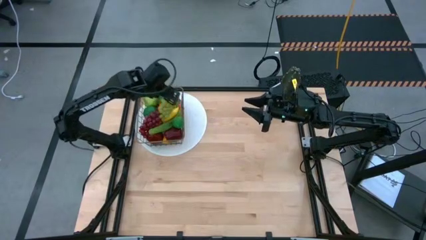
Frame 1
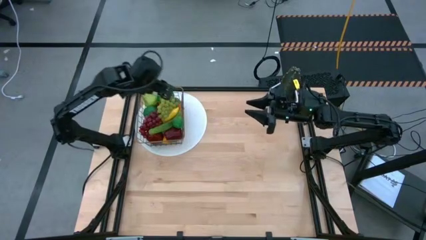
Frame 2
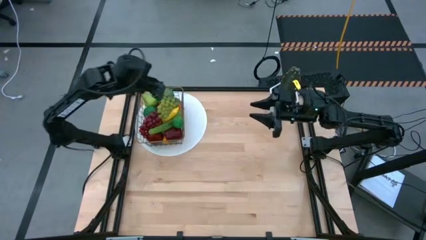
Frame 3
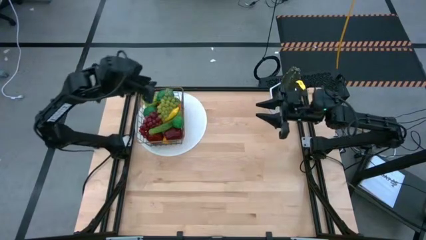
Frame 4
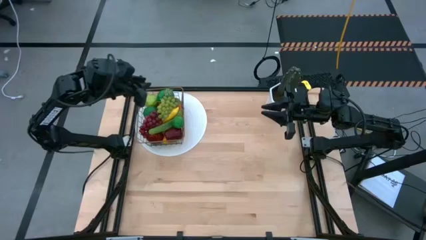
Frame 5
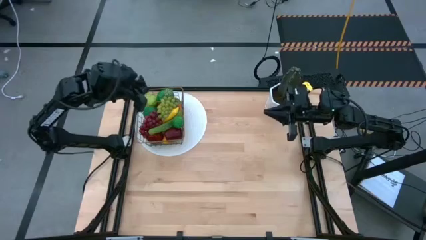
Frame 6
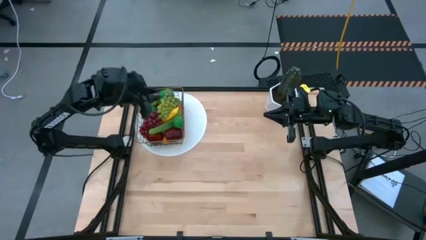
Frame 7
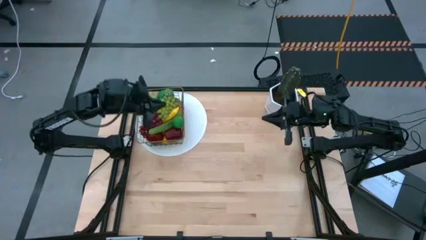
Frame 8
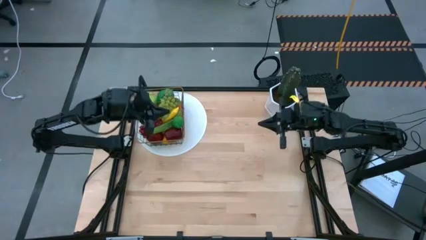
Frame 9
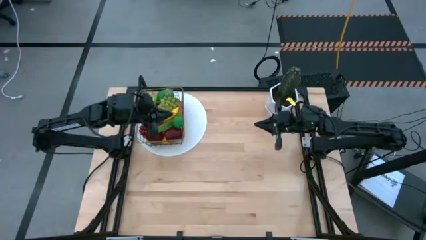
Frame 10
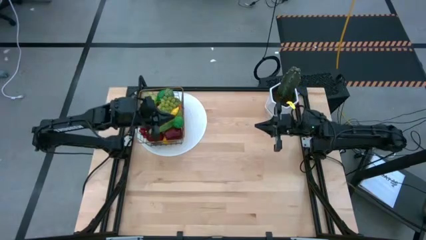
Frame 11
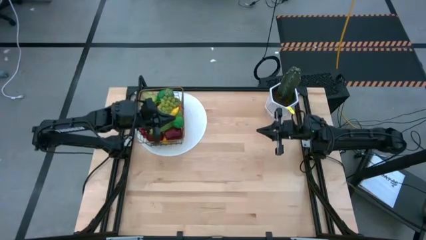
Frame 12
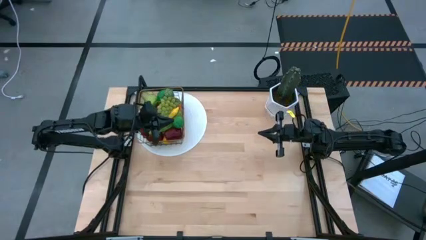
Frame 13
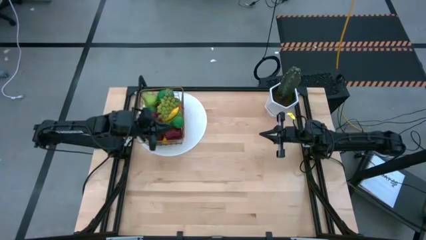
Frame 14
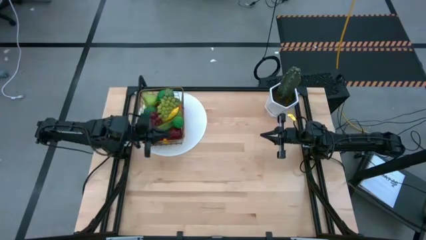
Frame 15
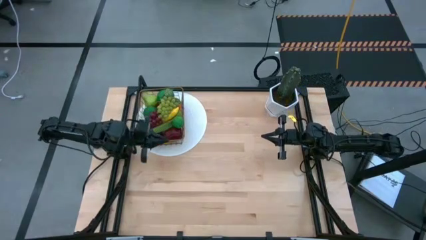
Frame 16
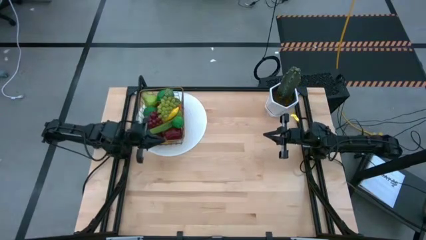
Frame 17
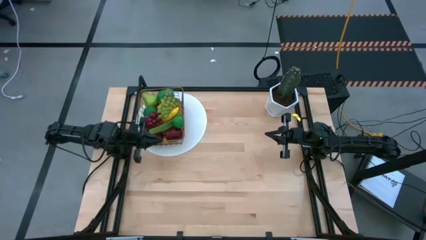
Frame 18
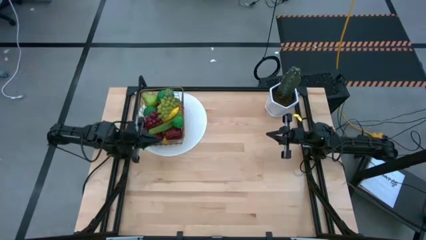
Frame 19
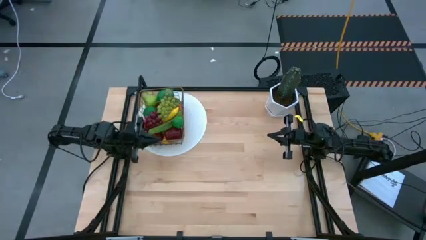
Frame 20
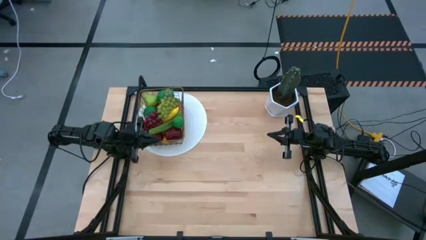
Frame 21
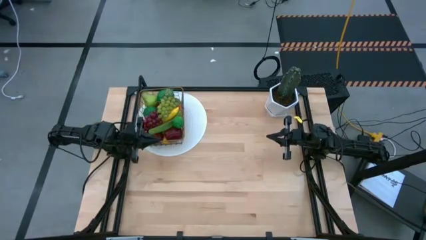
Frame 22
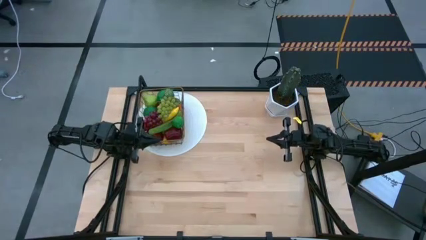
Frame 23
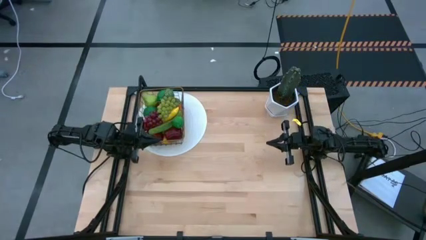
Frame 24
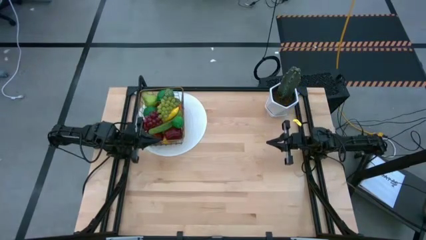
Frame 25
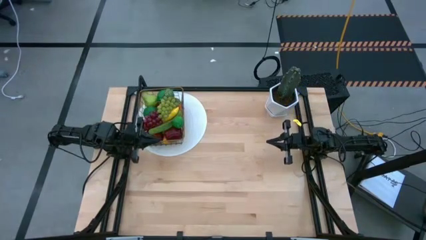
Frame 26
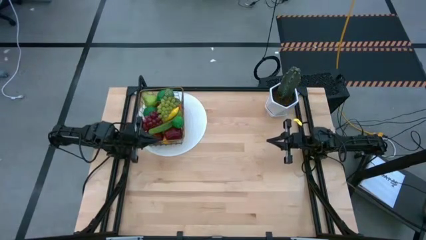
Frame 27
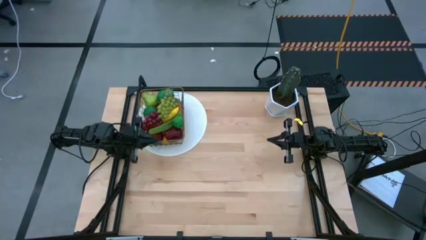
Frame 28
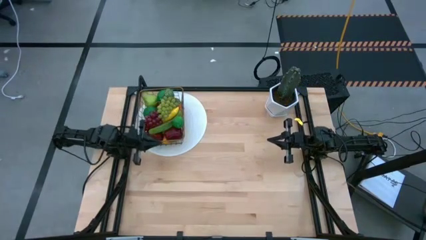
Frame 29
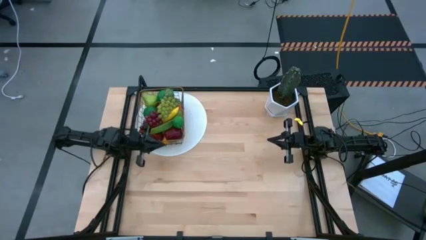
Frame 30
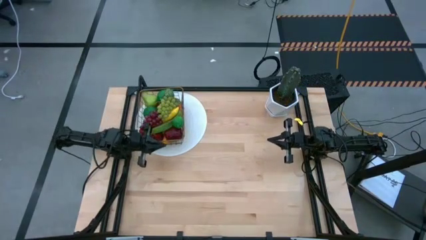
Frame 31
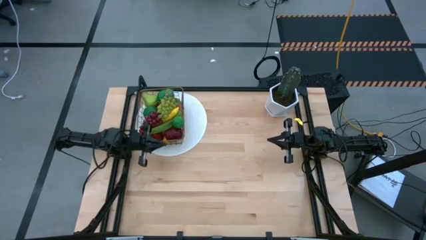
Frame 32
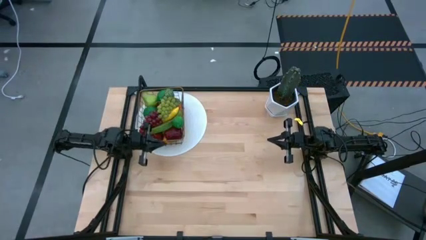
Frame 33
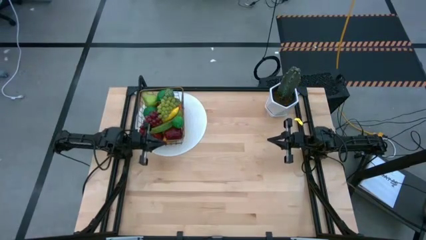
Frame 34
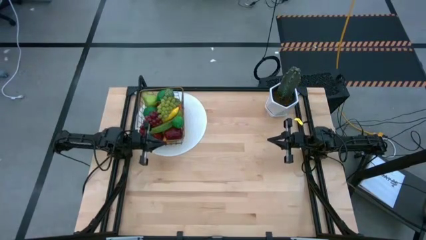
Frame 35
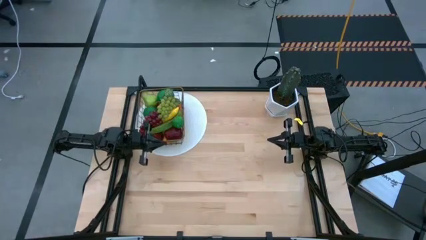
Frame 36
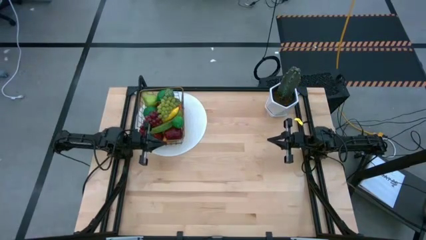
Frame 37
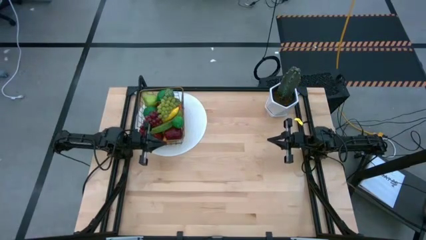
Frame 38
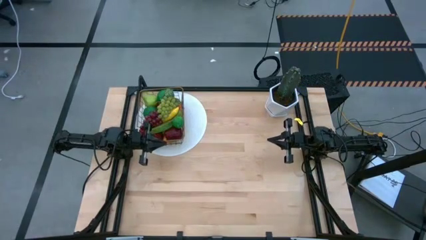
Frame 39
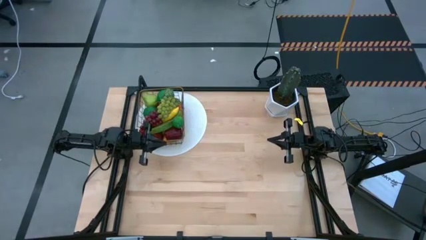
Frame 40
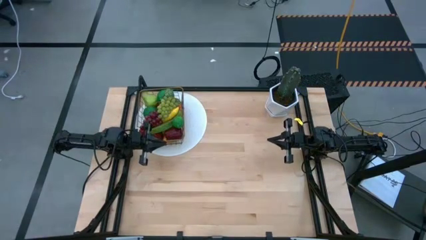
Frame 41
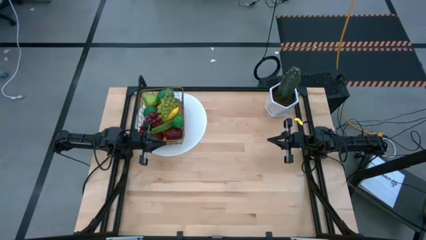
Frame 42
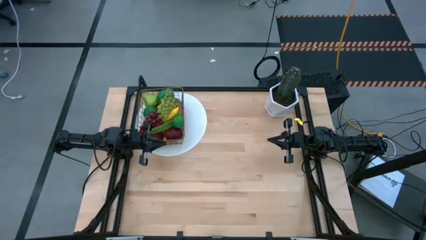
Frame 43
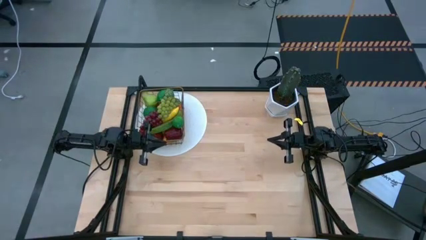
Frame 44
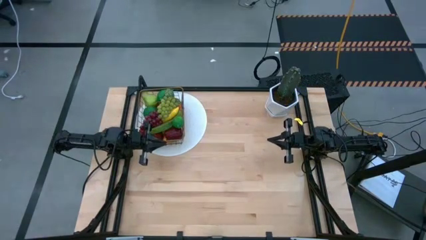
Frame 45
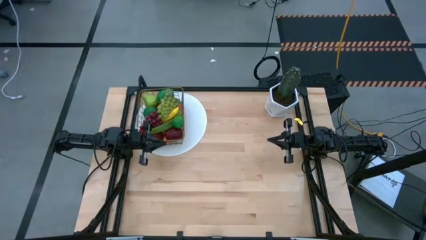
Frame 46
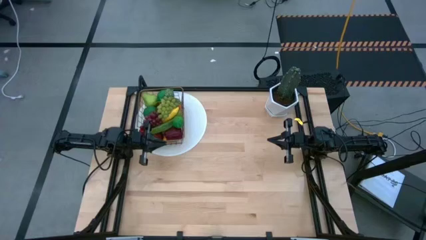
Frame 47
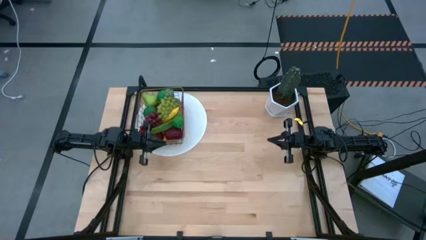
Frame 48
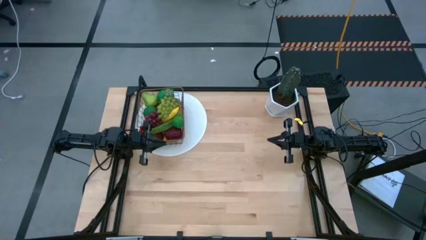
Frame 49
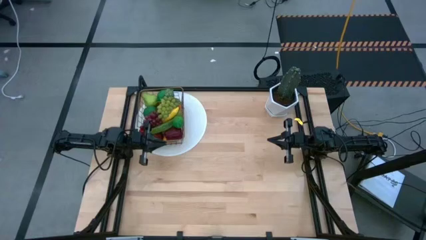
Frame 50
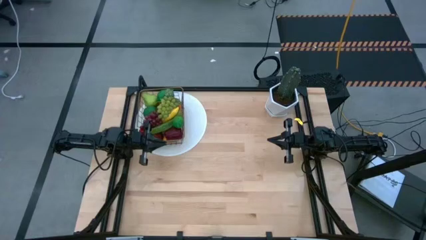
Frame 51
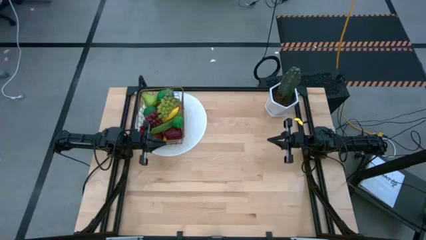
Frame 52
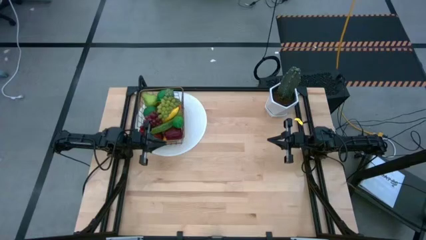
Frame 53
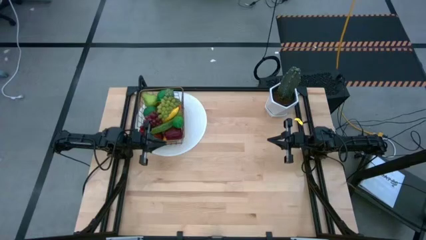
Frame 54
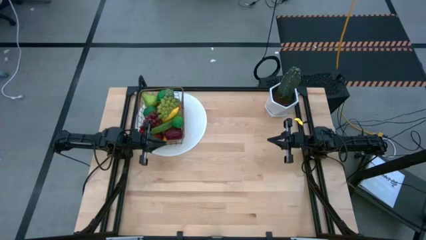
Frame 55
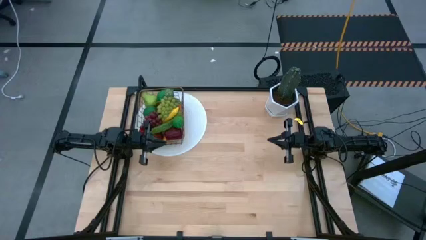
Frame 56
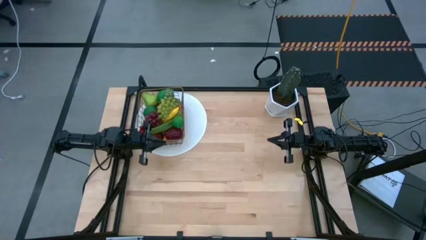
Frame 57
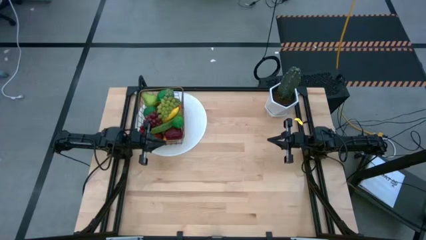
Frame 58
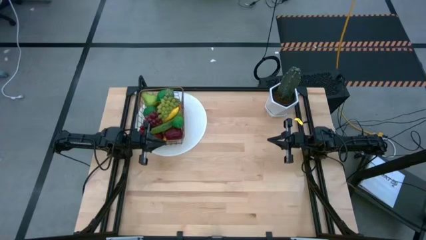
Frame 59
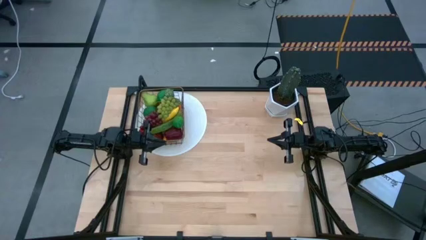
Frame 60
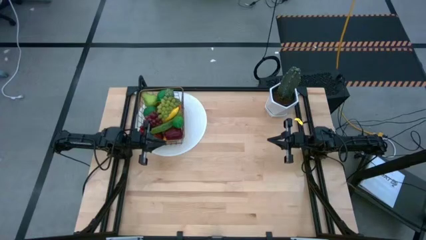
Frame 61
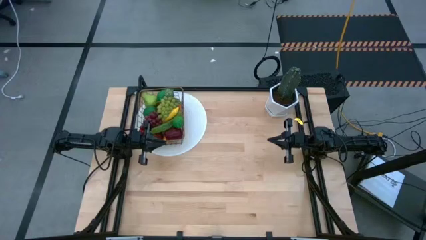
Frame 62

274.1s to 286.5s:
Task: Build produce basket
Return to Home Position

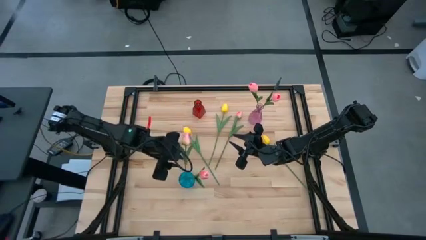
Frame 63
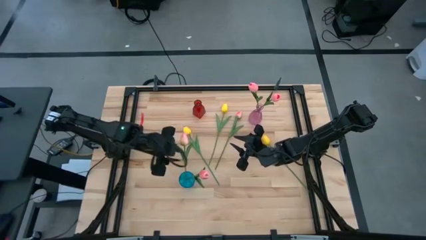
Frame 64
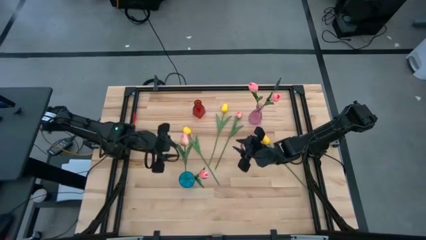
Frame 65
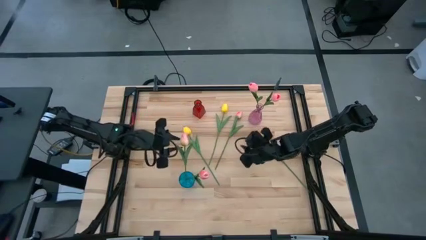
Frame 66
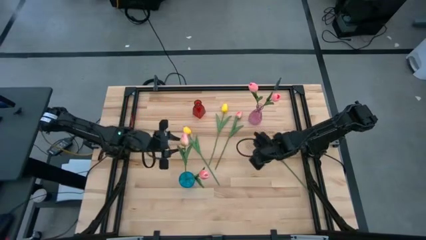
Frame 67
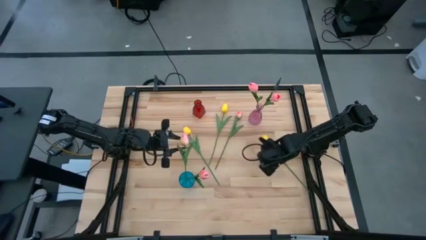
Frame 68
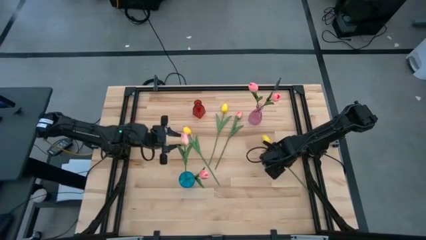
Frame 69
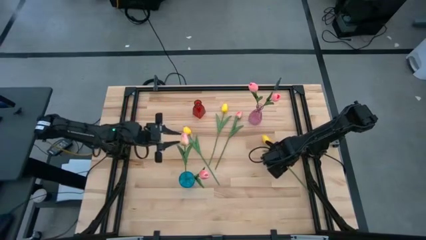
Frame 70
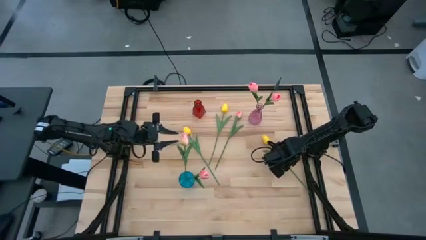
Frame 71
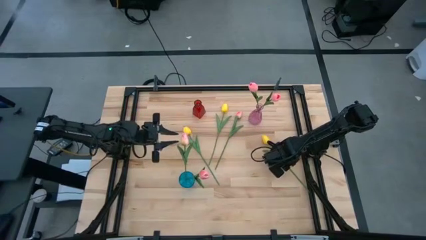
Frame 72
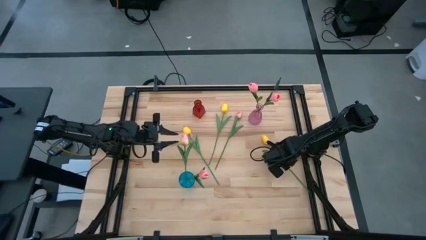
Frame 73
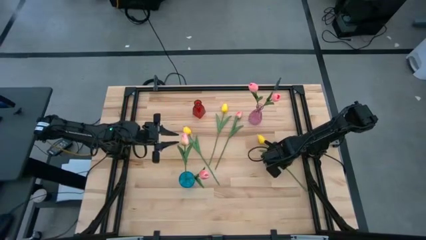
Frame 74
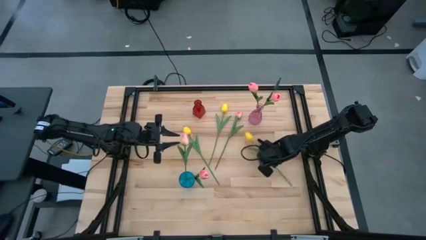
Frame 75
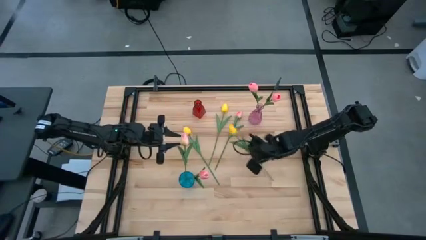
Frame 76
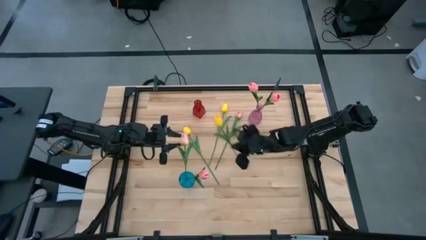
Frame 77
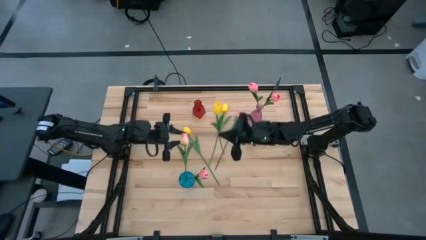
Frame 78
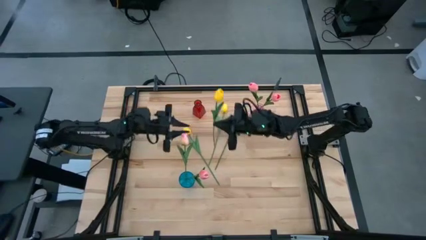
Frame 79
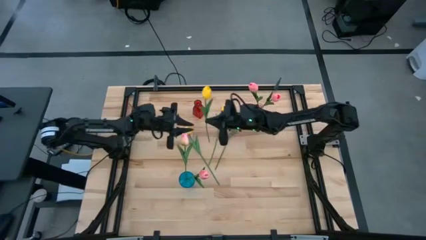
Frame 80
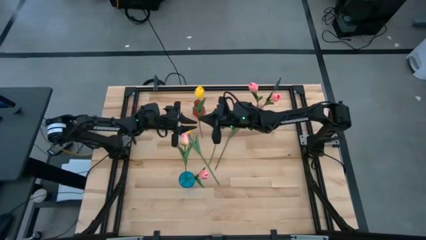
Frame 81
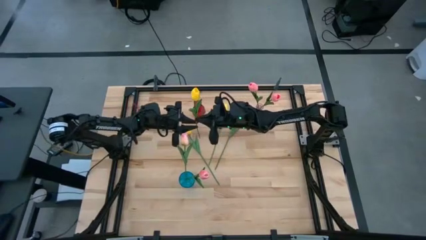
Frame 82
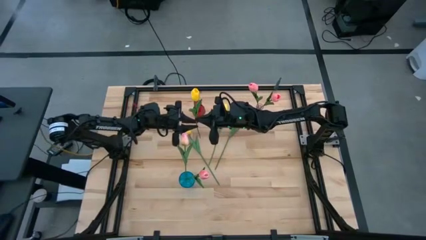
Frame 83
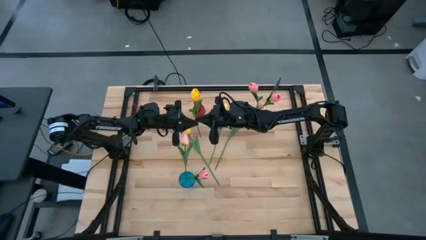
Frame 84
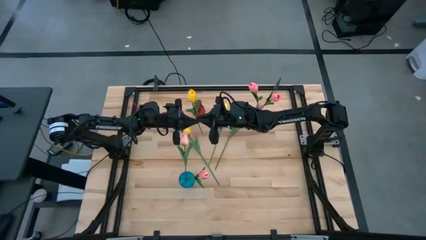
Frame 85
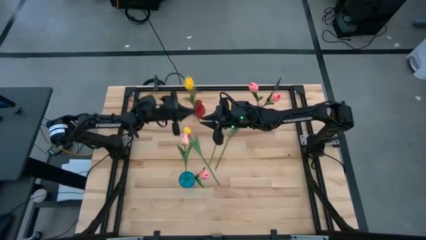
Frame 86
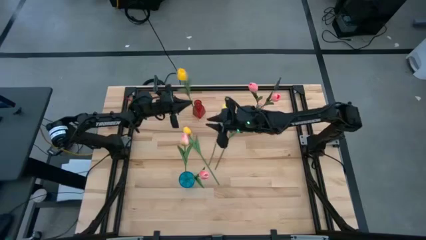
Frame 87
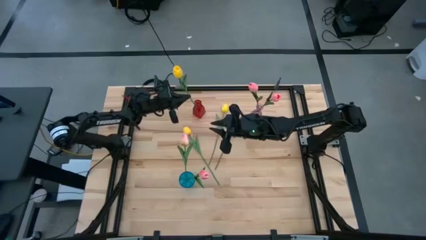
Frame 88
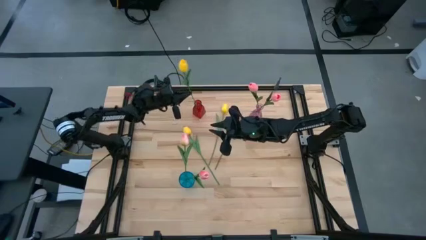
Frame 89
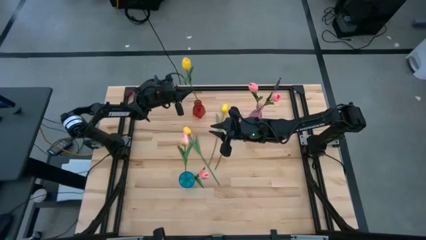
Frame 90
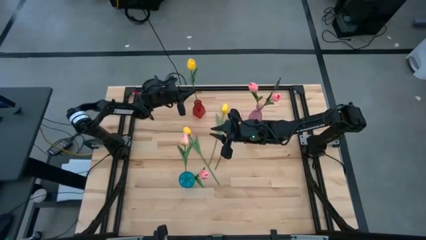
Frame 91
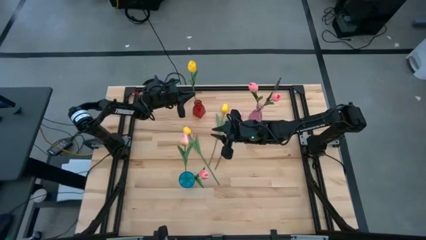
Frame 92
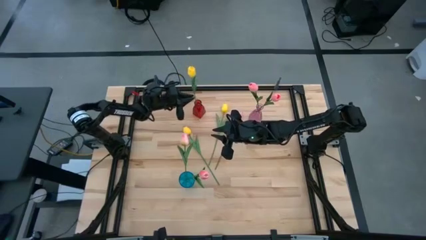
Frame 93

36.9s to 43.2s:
Task: Sort flowers into vase by color
Put the right yellow tulip into the red flower vase
